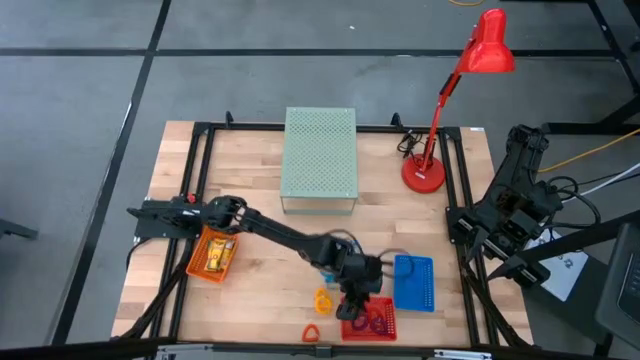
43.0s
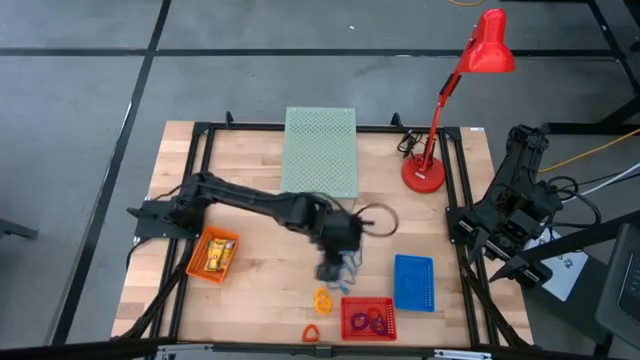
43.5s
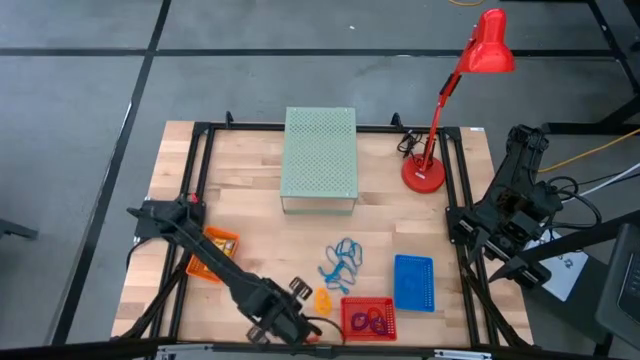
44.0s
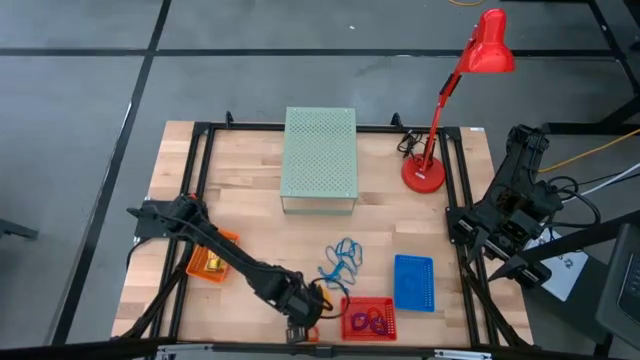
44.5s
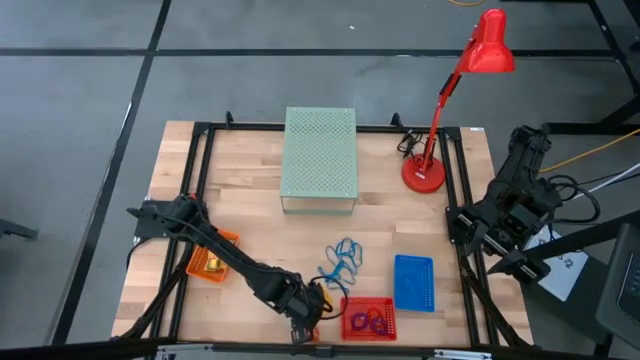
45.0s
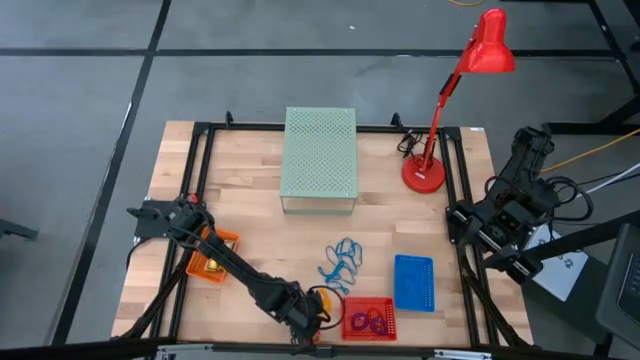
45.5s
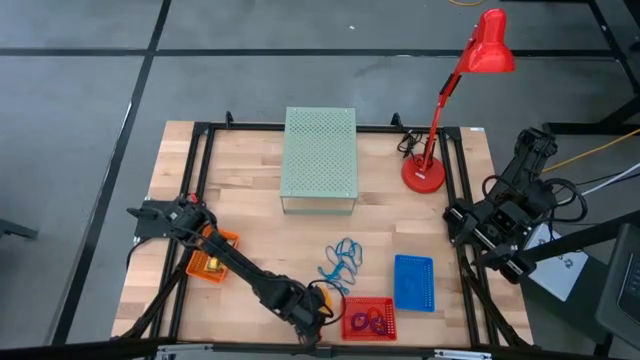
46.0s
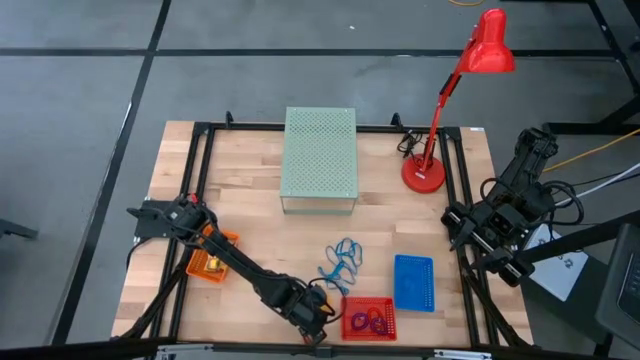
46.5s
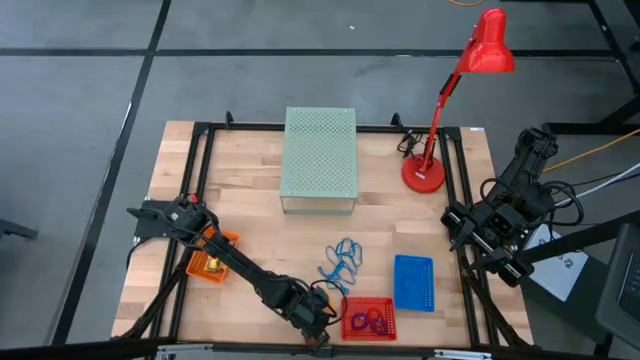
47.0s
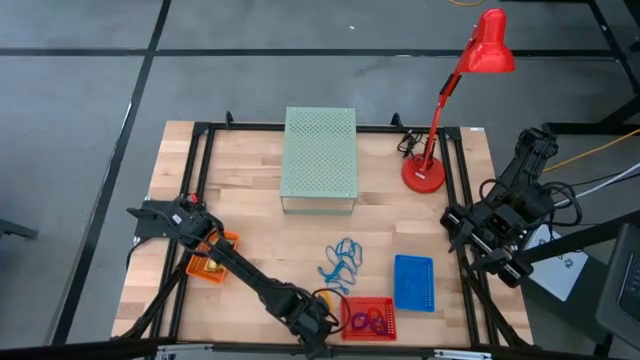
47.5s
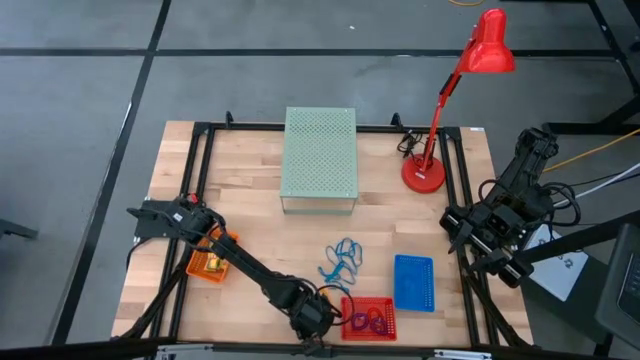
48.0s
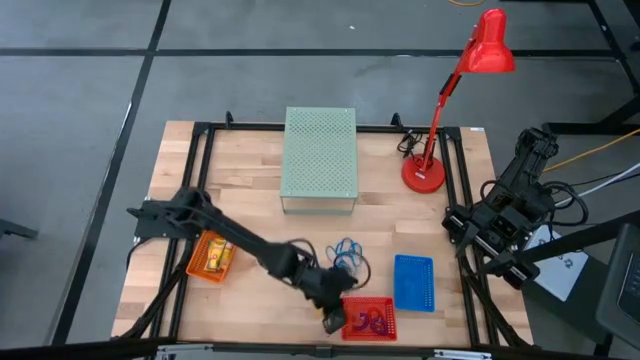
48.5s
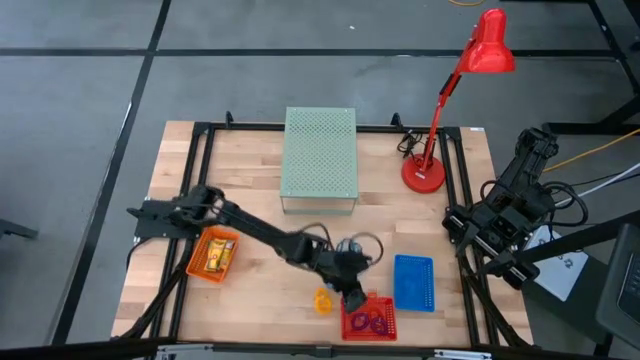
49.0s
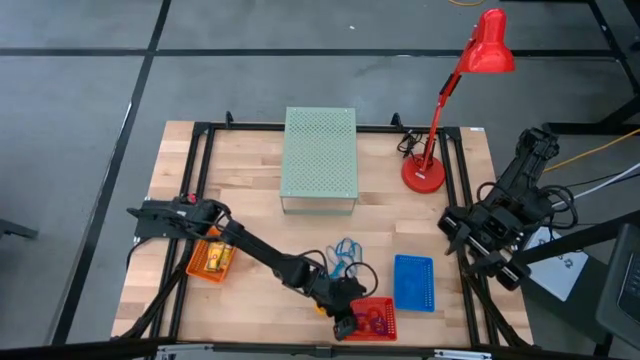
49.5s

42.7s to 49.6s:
Task: Pick & Place Office Desk Supplies
Put the red coil keychain into the red bin

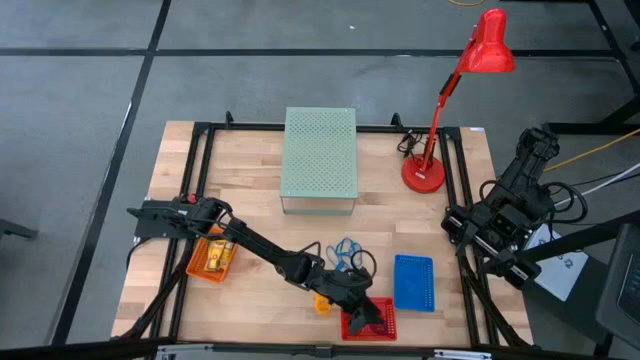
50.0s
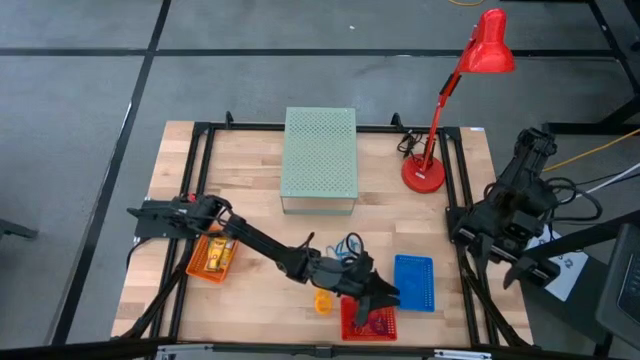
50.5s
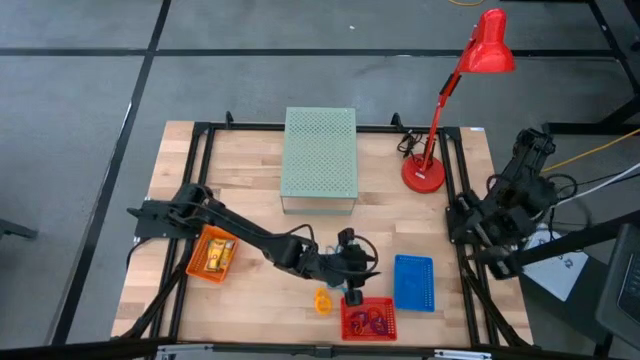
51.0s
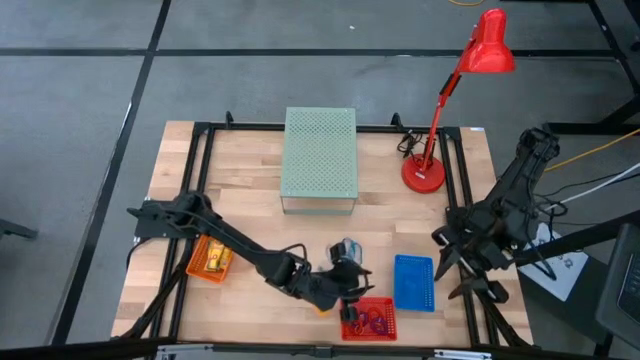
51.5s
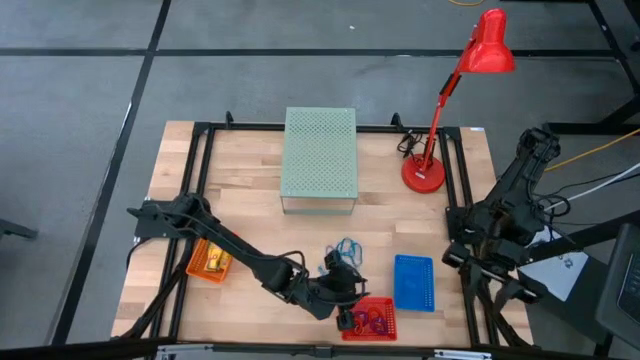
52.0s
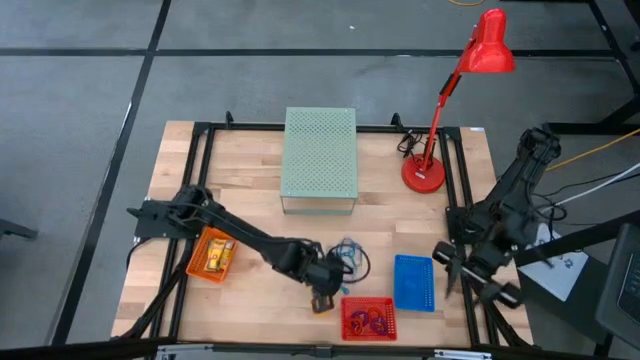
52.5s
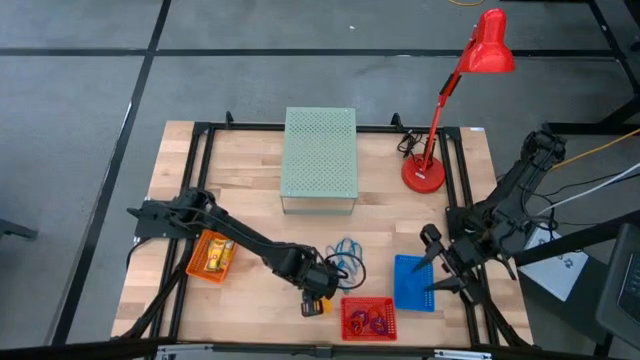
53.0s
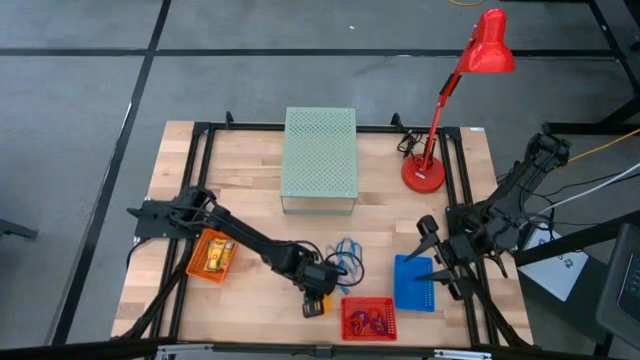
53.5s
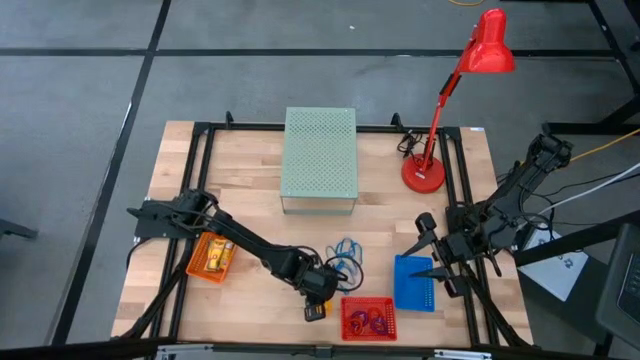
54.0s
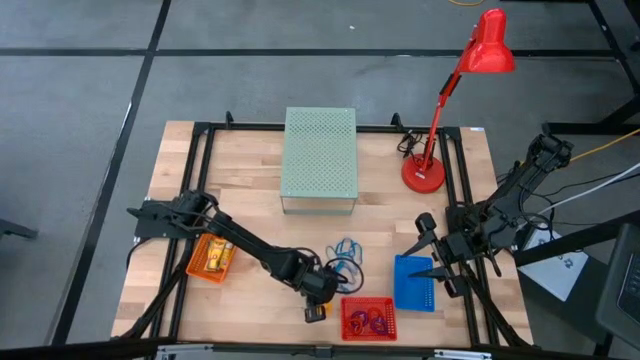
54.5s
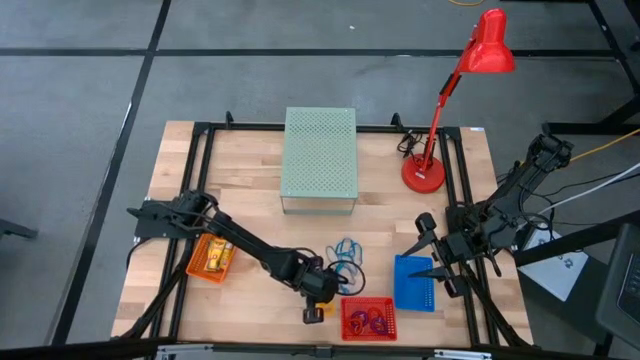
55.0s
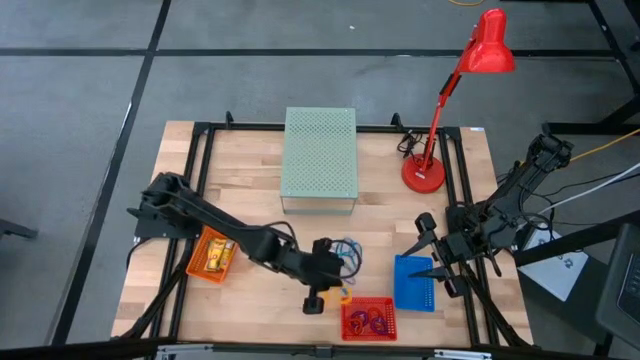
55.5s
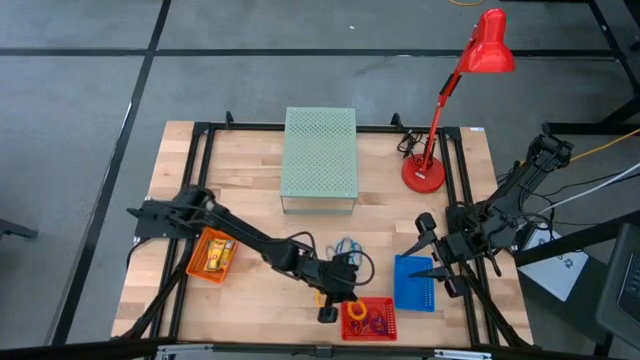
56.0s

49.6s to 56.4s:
Put the yellow coil keychain into the red bin

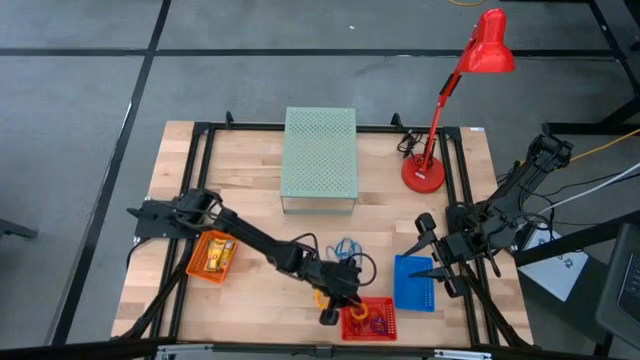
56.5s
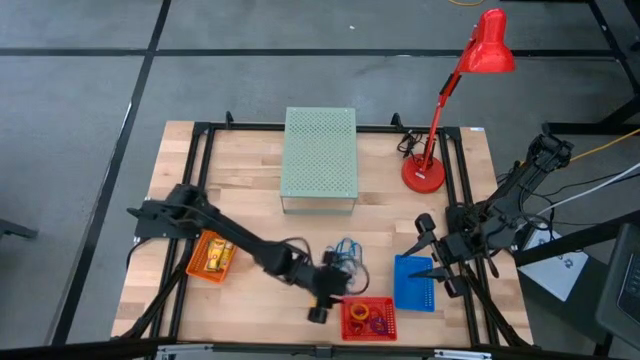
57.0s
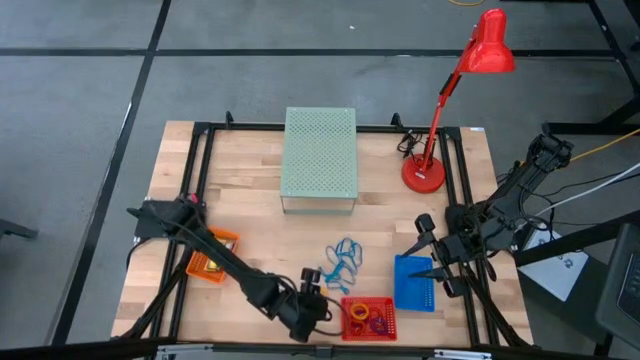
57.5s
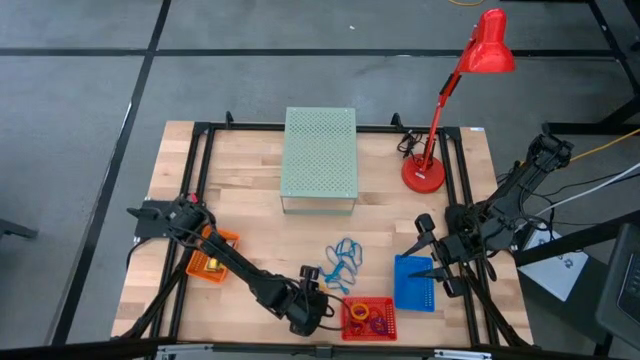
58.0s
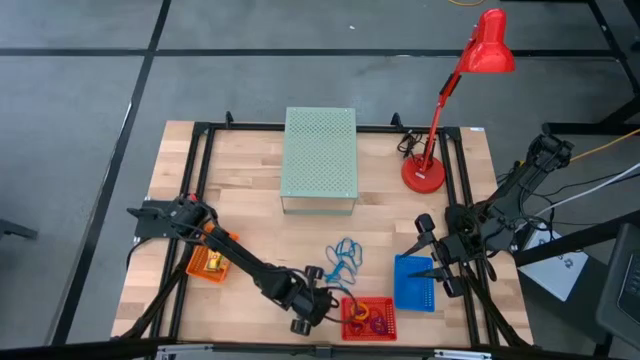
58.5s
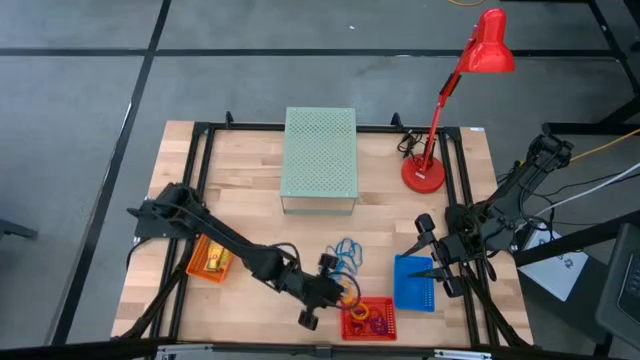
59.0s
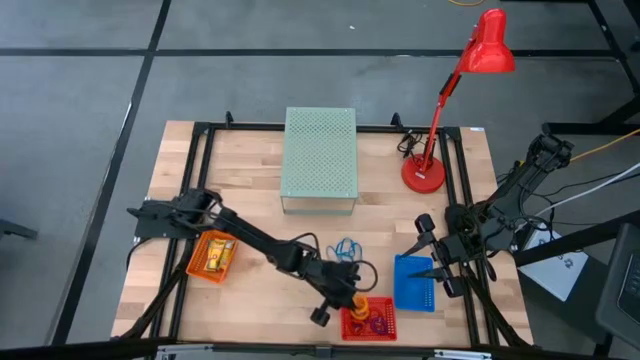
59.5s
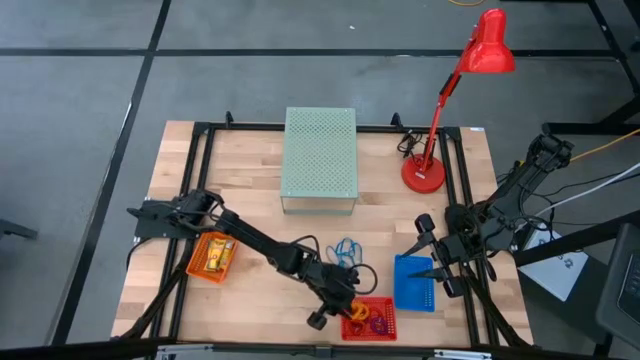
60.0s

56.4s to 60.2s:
Put the yellow coil keychain into the red bin

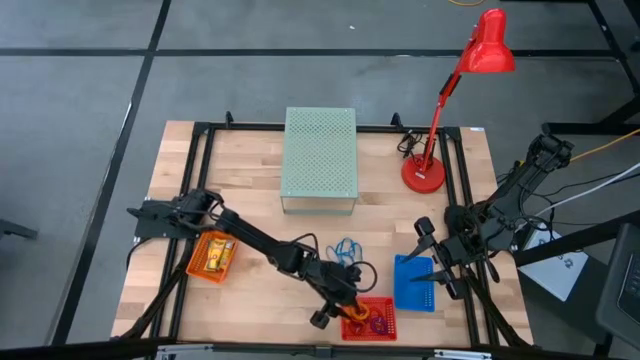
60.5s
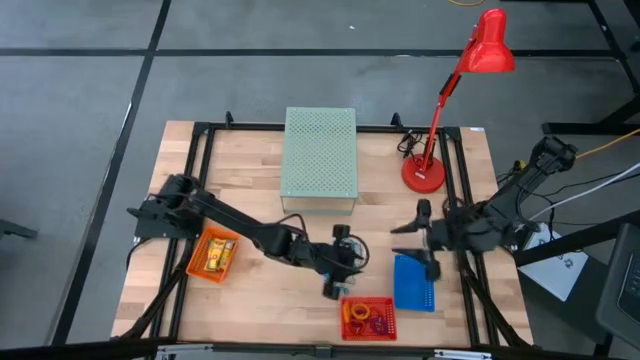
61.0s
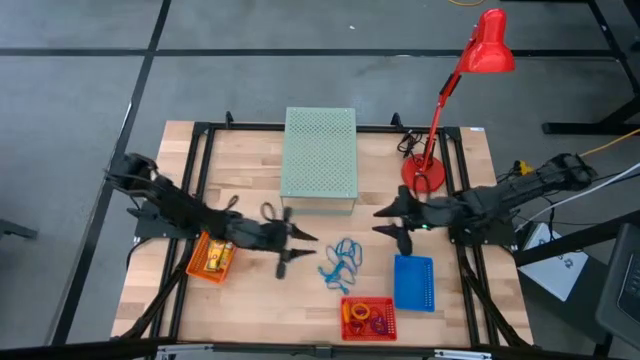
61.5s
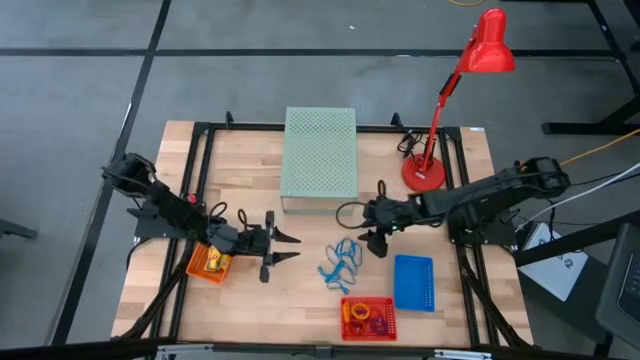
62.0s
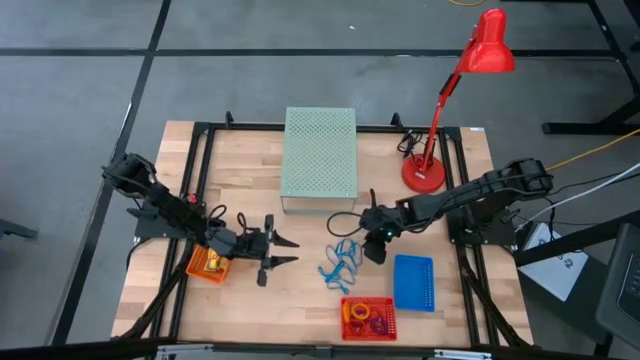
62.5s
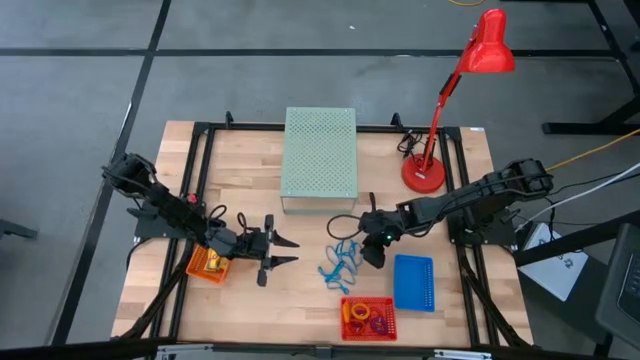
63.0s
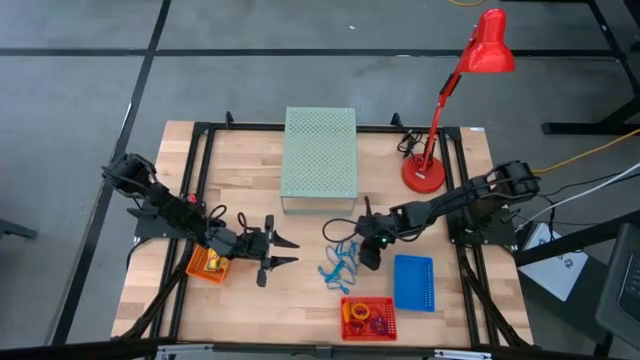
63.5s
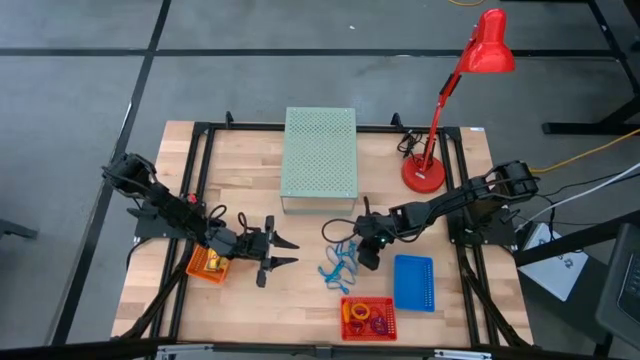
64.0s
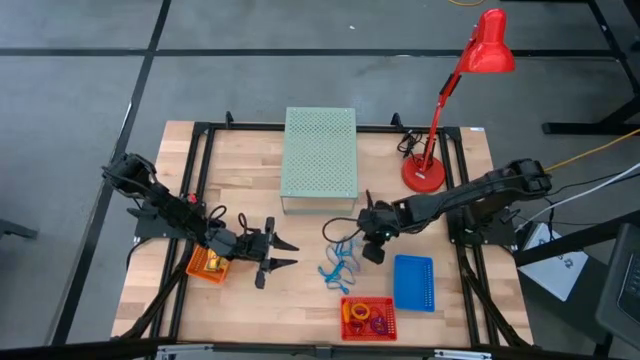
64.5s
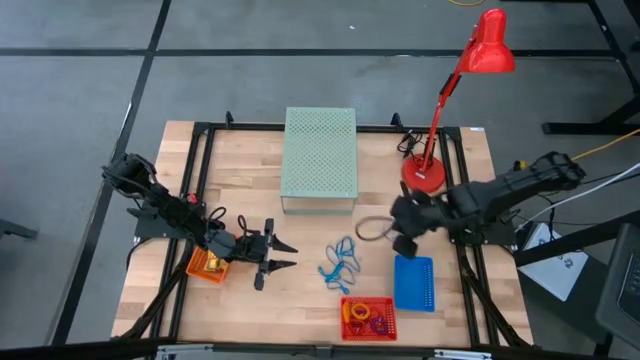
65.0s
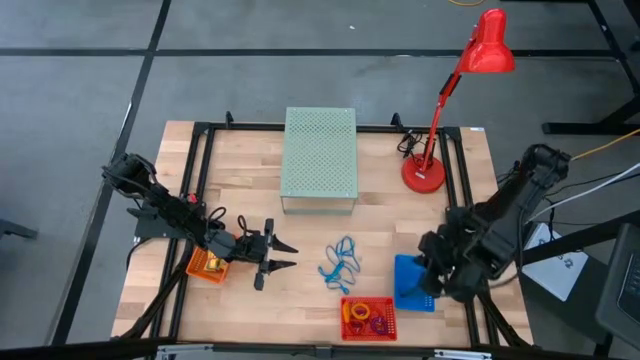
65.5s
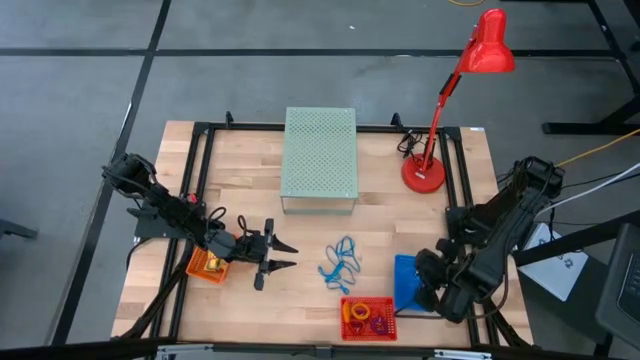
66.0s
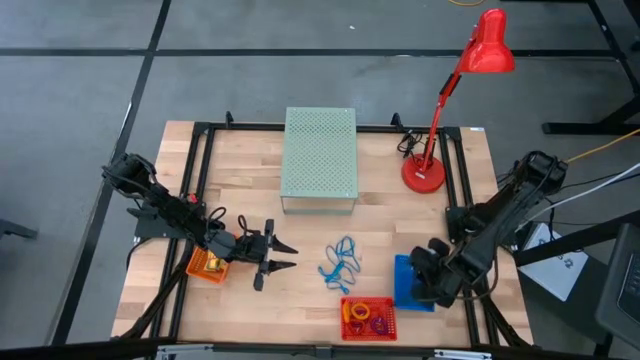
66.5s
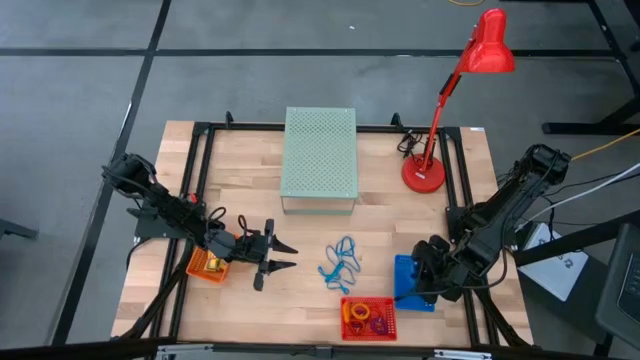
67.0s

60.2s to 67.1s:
Put the blue rubber band into the blue bin
